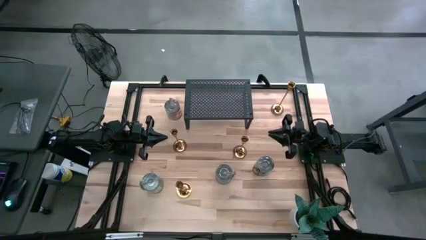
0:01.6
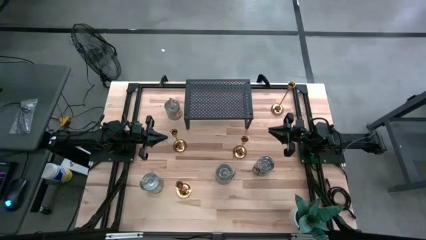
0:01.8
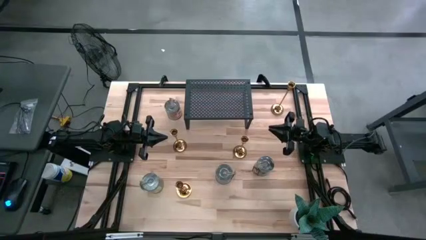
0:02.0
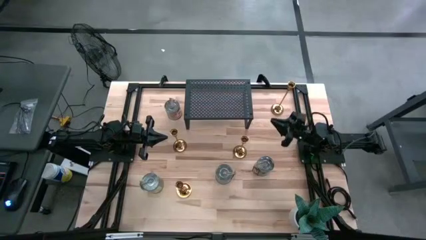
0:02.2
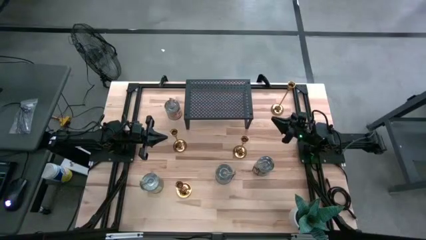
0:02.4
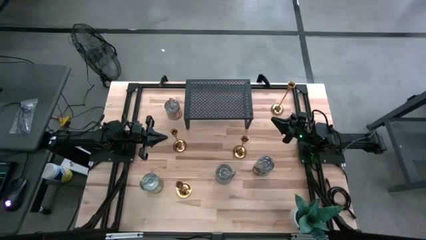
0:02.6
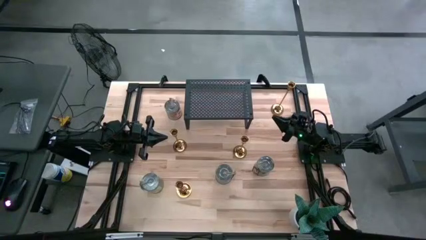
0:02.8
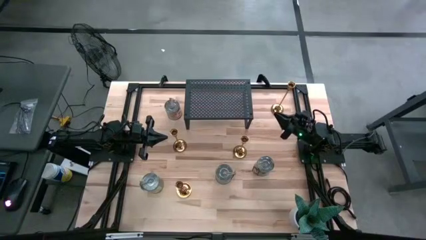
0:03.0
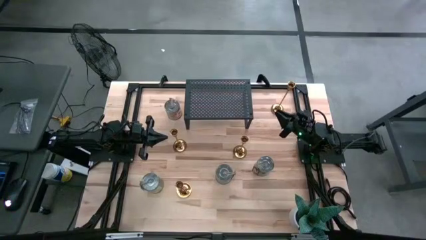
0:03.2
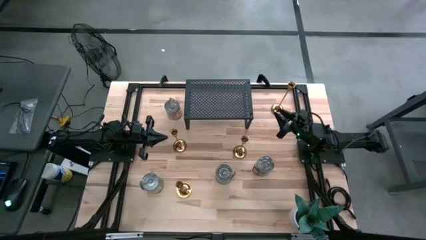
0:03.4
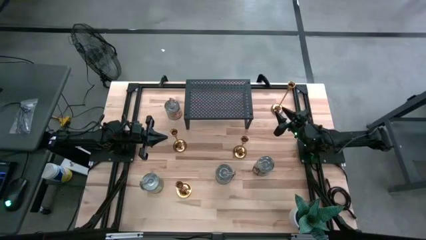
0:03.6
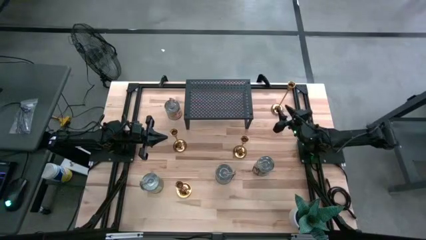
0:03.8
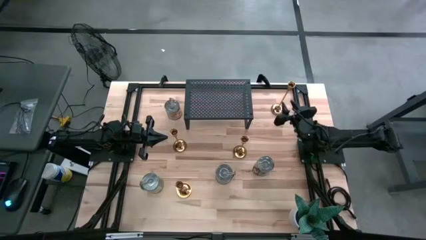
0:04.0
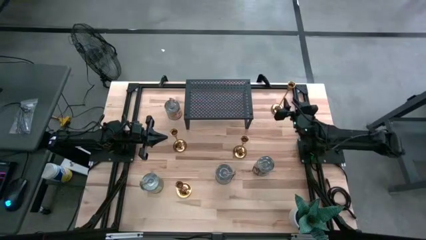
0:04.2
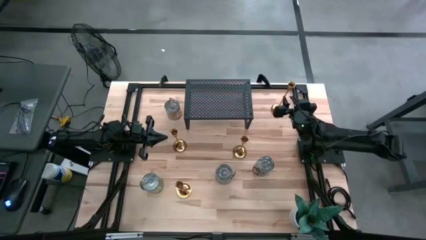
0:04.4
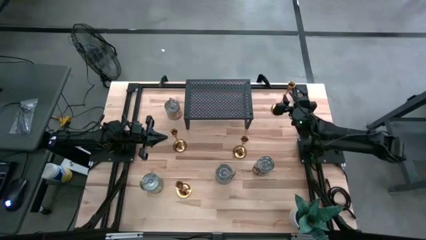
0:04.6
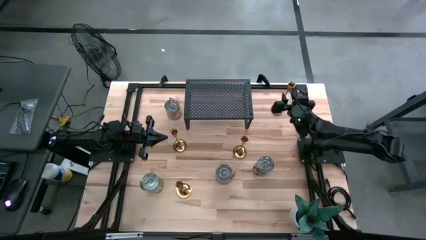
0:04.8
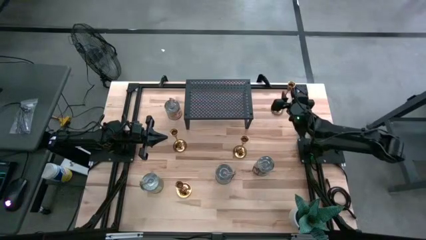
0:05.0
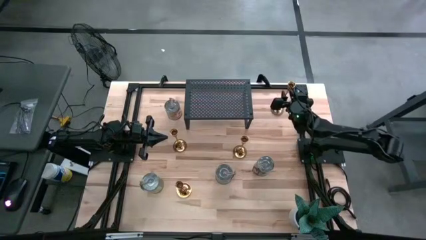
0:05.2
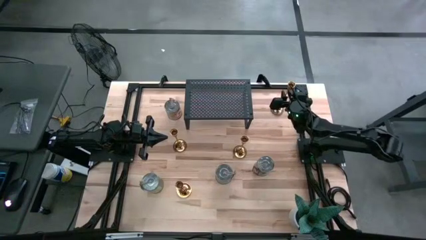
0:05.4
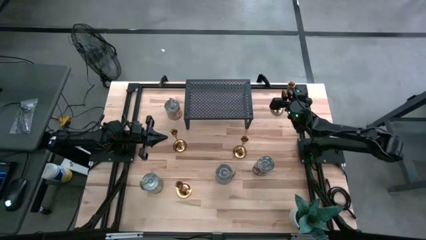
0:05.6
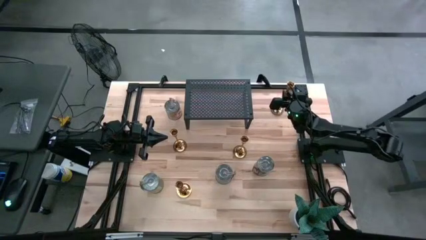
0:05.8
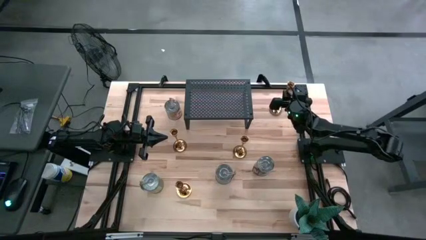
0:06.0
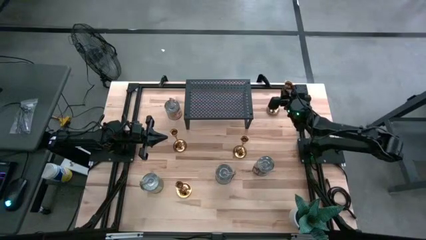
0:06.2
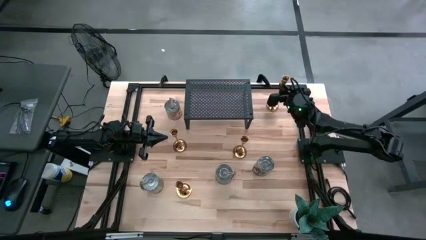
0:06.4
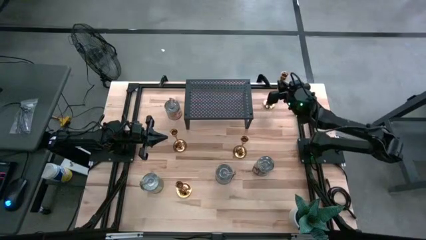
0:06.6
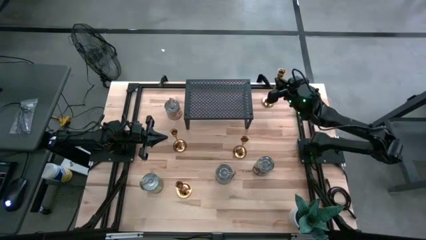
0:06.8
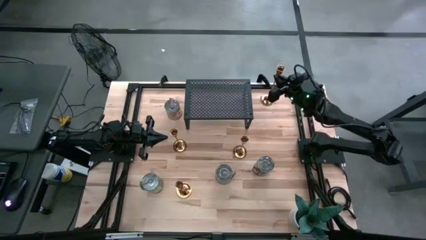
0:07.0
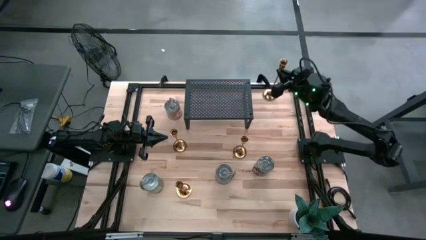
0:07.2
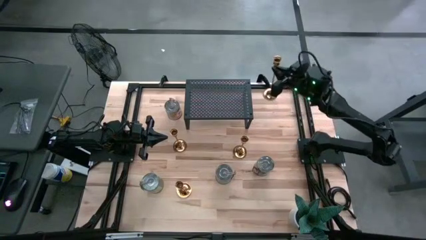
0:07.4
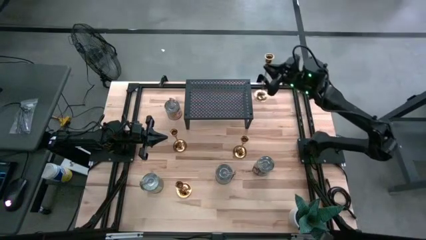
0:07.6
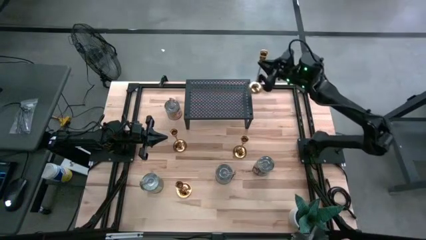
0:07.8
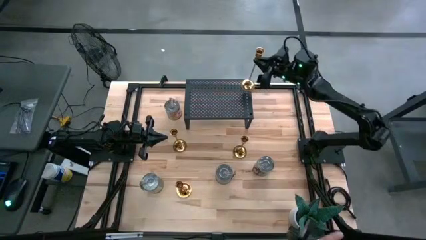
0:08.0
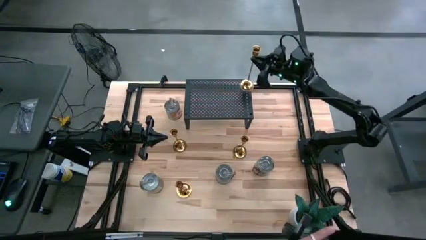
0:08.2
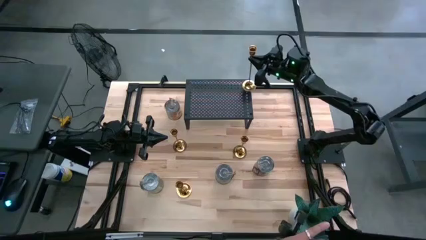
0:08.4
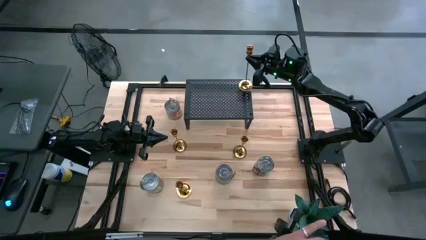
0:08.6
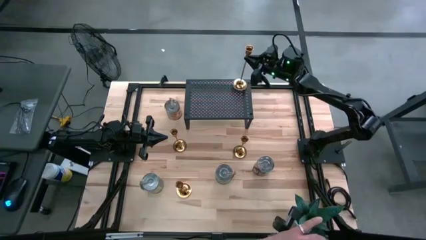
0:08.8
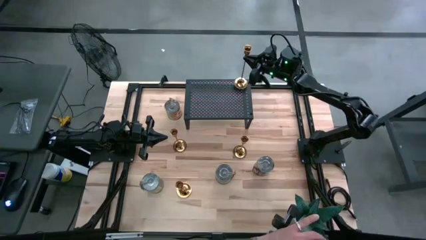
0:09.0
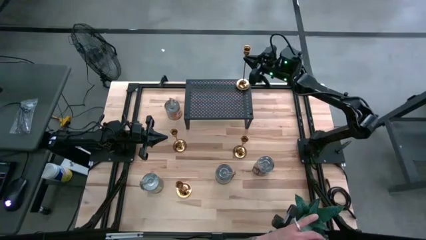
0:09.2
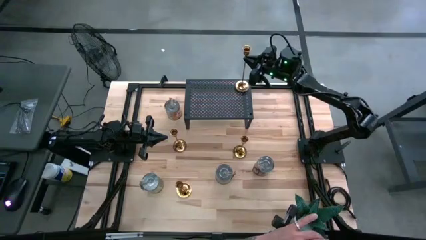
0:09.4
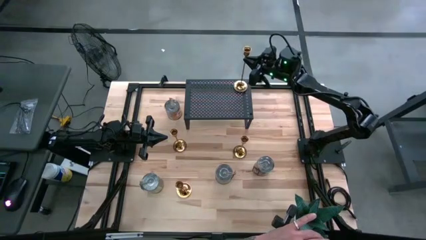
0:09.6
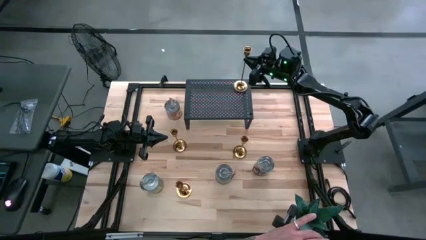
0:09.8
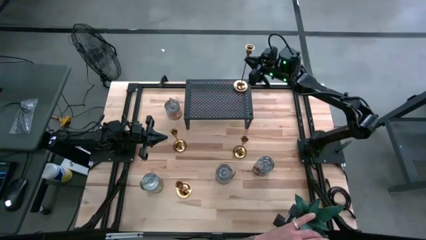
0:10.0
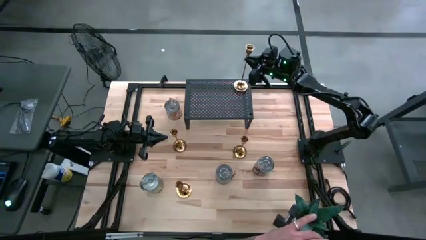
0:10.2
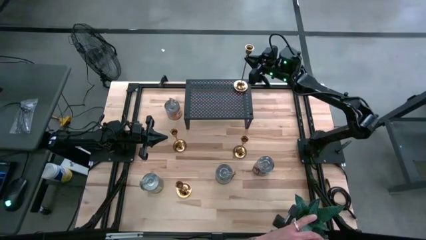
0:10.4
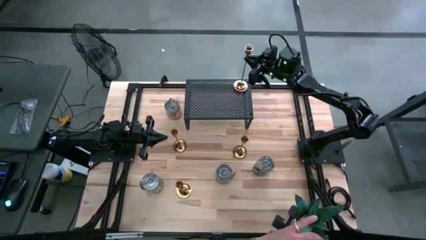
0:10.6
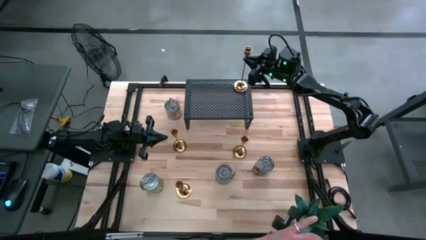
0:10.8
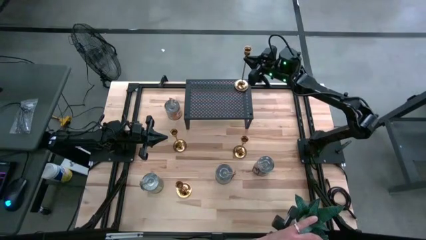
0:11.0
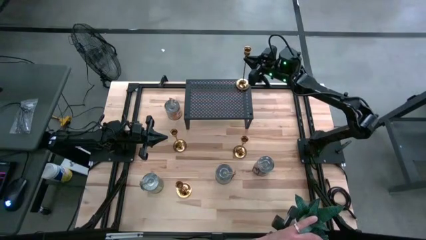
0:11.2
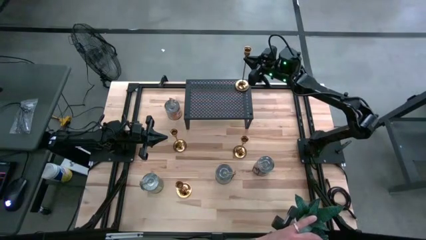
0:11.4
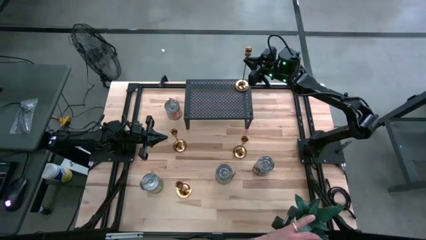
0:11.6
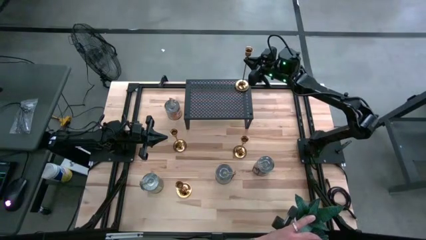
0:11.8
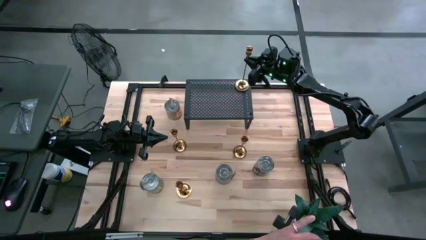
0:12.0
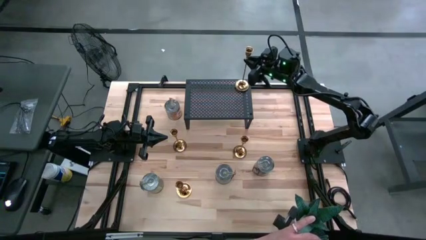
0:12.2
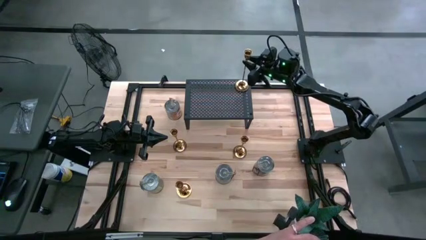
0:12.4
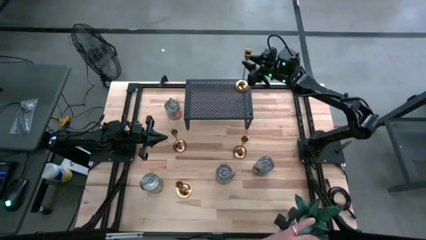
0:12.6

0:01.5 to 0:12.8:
Task: Pick & Place candle stick holders
Put the golden candle holder on the shelf
